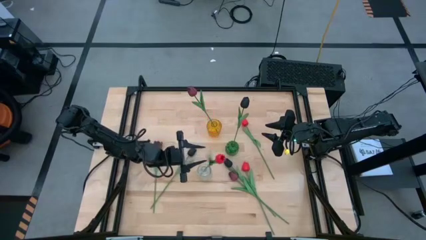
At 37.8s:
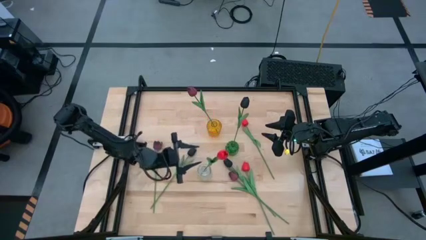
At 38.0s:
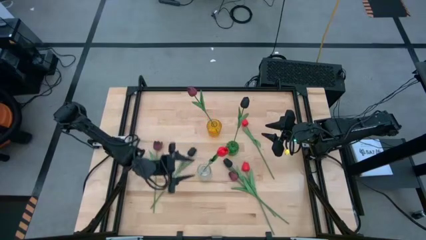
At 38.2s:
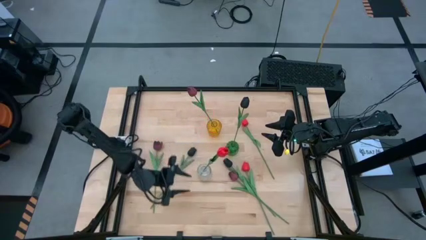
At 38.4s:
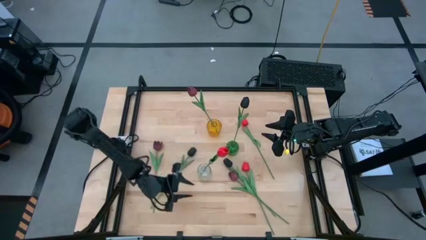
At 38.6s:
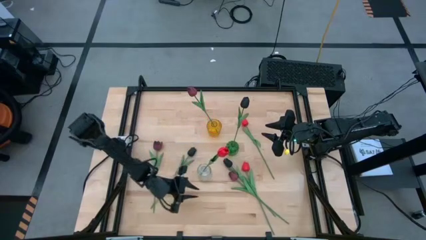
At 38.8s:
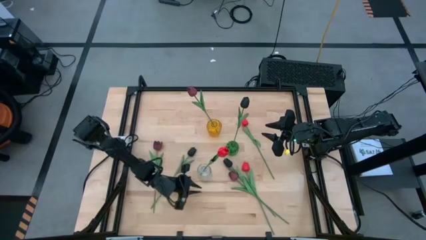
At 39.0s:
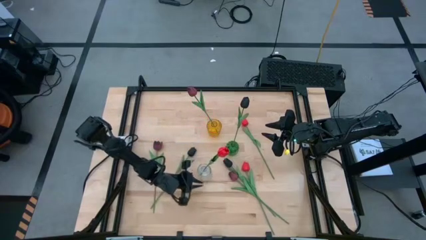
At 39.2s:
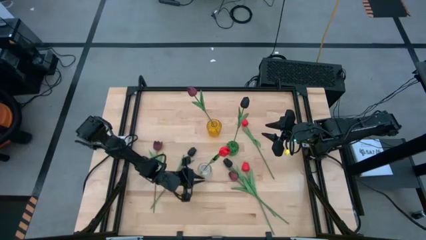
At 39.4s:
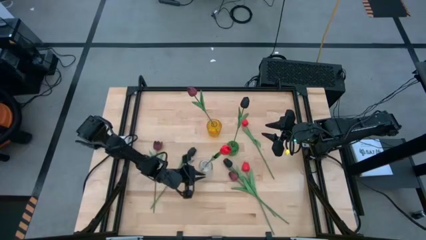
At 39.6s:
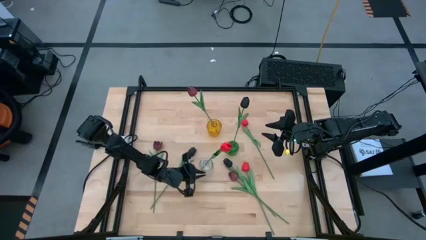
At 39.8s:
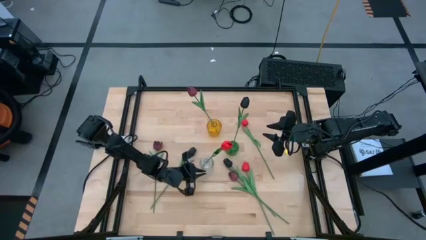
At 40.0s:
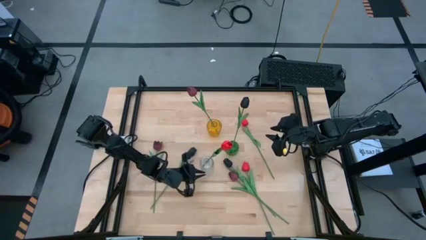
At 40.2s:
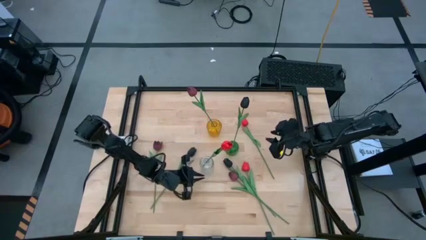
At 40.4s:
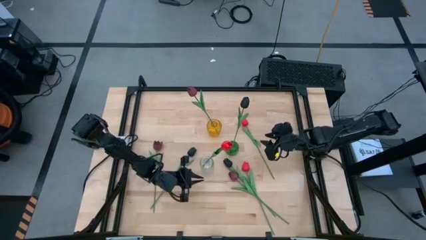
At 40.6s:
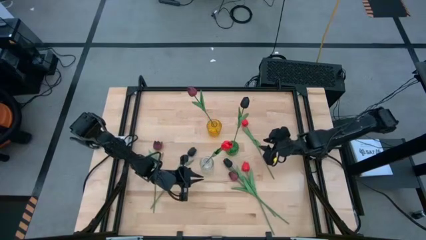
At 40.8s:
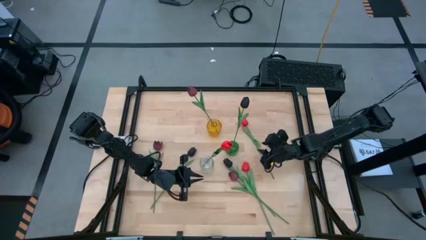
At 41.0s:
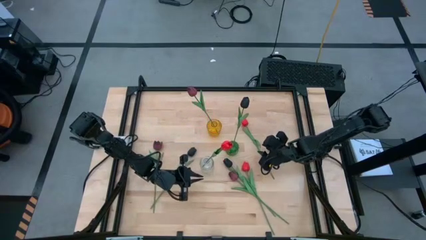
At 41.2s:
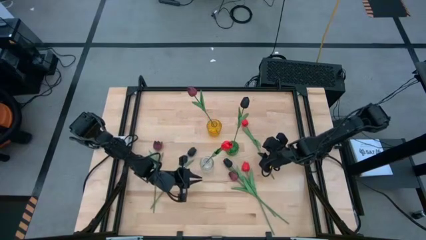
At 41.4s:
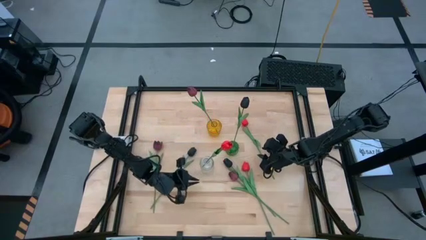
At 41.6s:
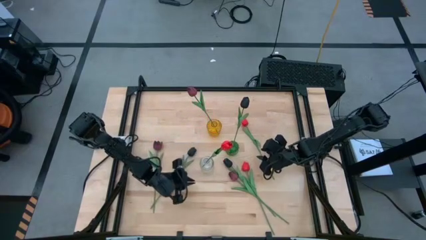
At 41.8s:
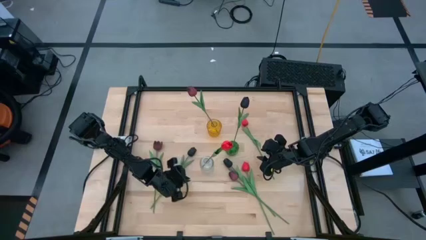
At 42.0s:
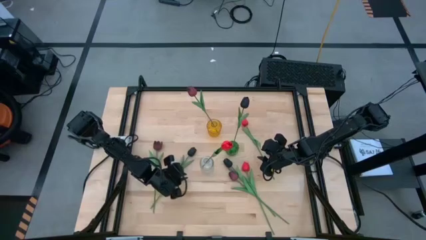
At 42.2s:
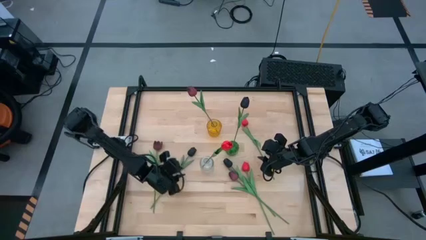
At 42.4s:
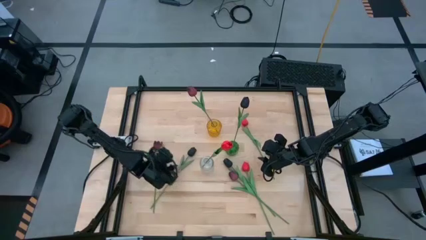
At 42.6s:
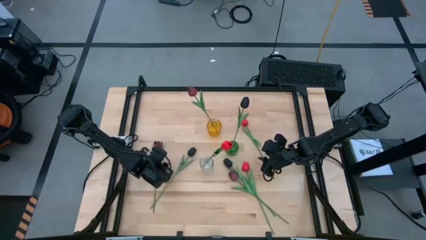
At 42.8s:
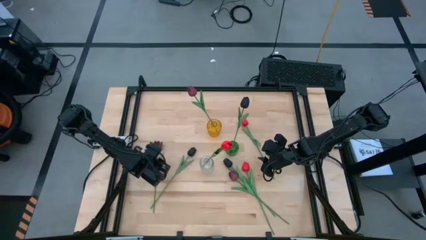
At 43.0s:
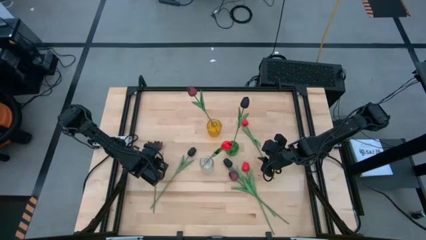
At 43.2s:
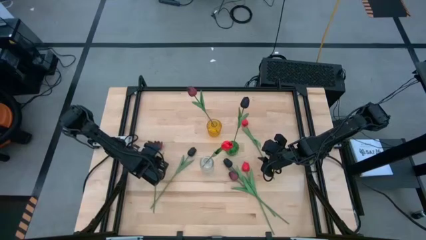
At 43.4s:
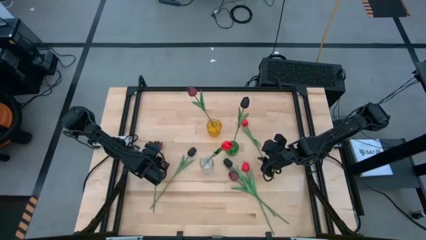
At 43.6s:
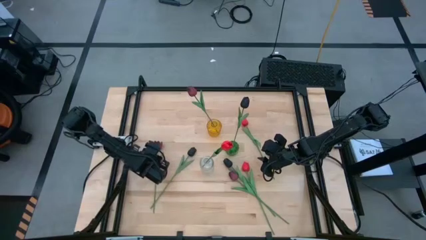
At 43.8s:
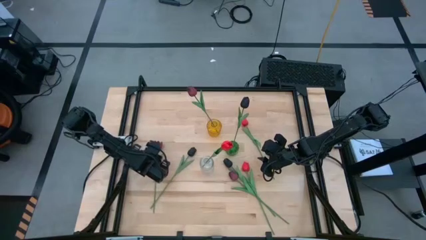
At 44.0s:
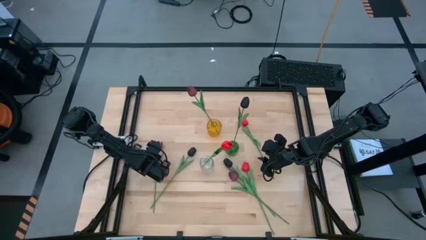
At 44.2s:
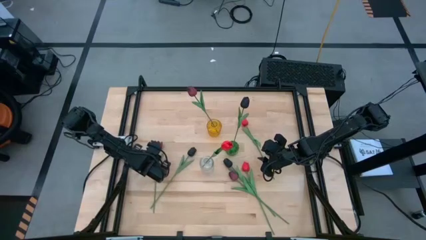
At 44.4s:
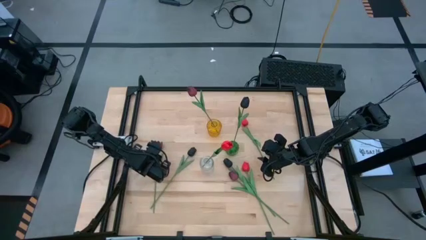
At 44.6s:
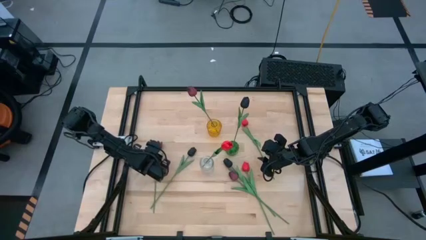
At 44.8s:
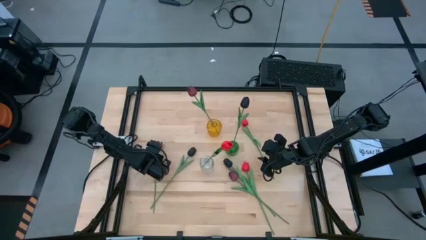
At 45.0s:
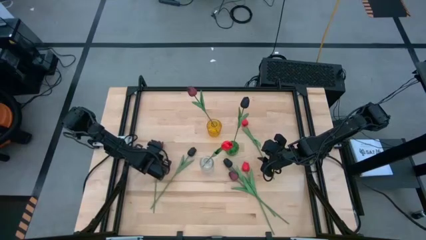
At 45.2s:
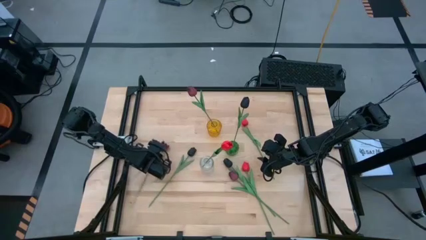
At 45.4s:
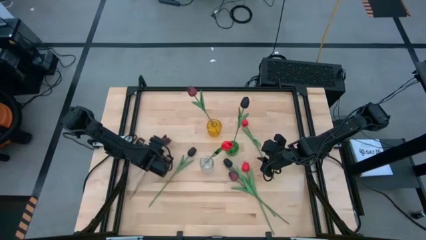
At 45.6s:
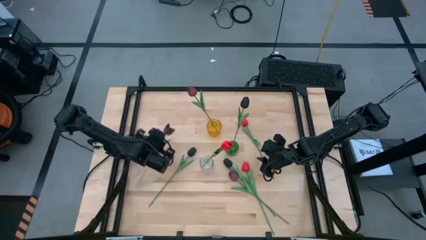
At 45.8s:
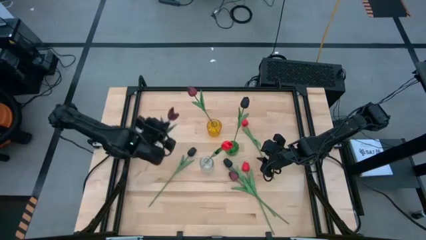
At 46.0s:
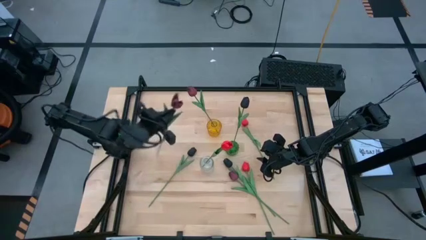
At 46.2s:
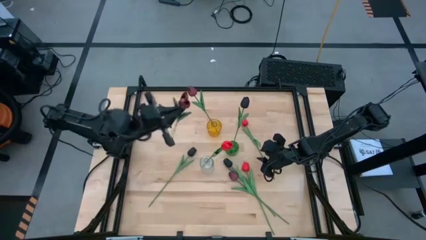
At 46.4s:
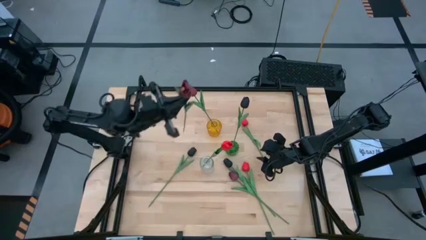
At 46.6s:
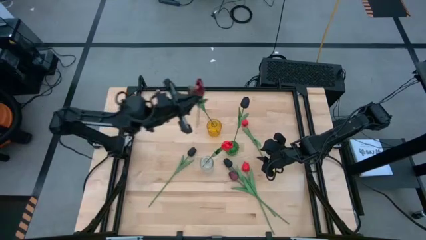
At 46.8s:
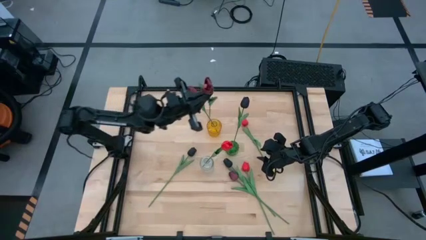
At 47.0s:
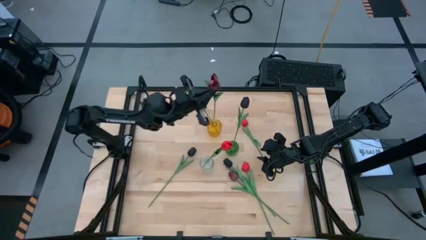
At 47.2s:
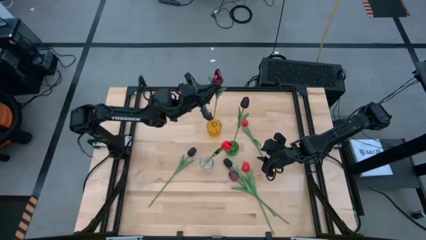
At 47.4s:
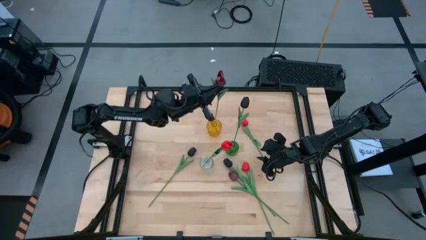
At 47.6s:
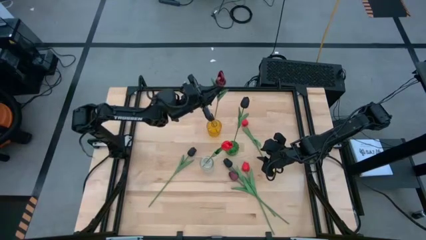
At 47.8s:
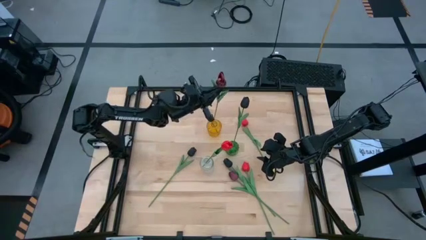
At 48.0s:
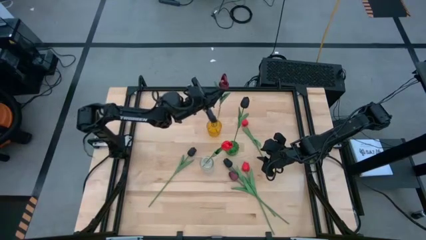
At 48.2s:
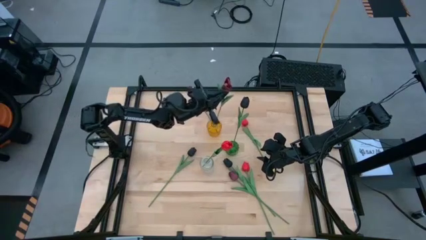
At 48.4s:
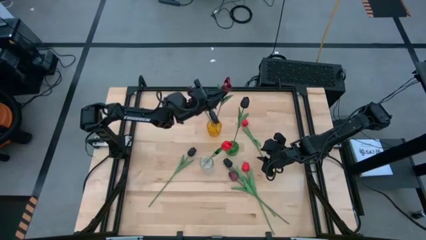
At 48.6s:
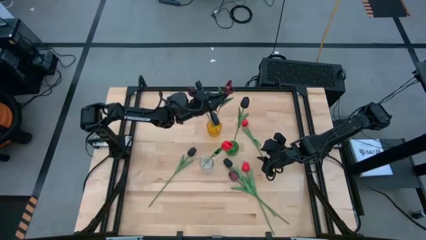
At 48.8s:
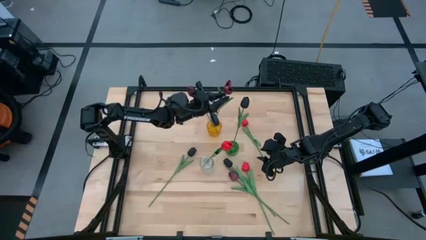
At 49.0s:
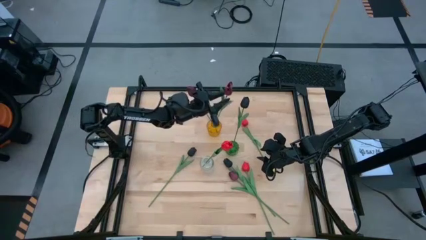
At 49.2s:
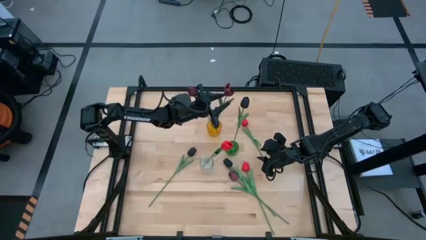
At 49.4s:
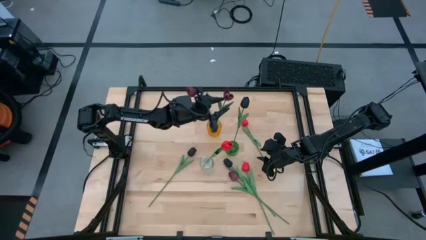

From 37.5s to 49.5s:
Task: Sort flowers into vase by color
Put the top left pink flower in the yellow flower vase
